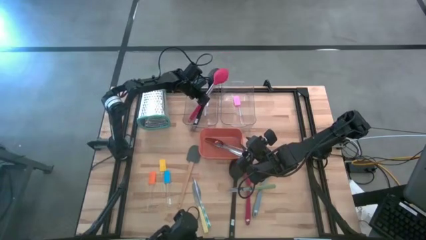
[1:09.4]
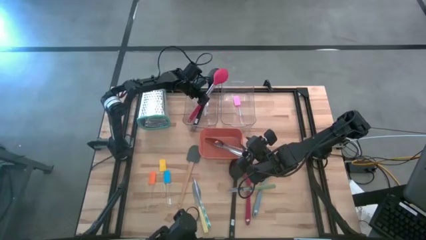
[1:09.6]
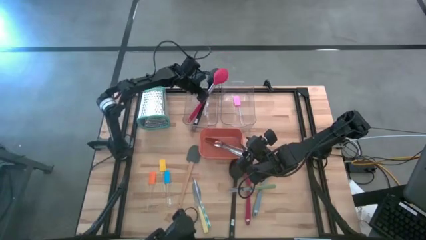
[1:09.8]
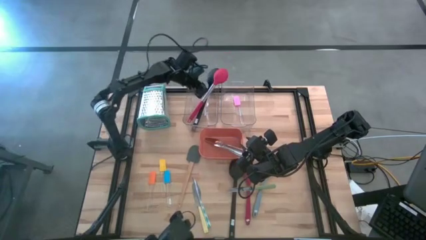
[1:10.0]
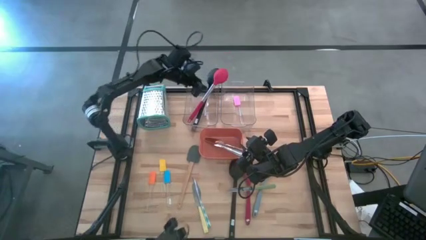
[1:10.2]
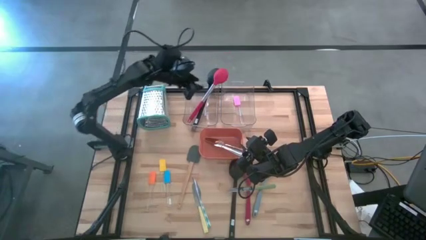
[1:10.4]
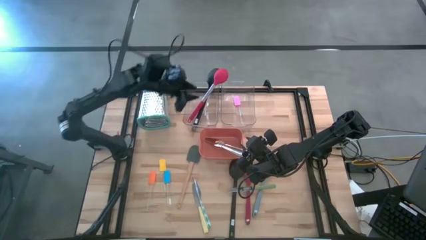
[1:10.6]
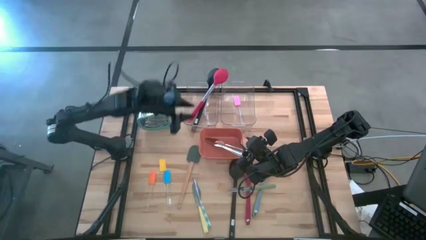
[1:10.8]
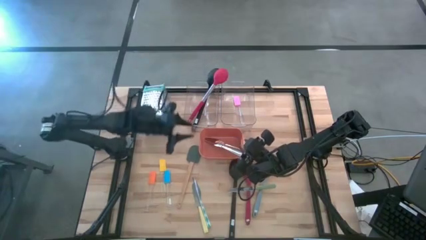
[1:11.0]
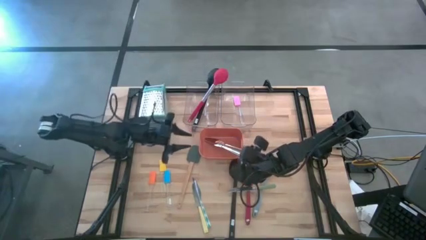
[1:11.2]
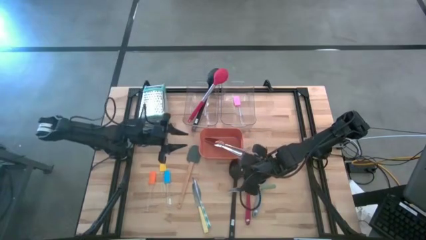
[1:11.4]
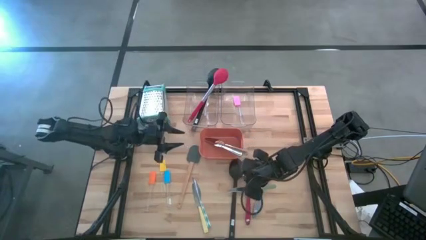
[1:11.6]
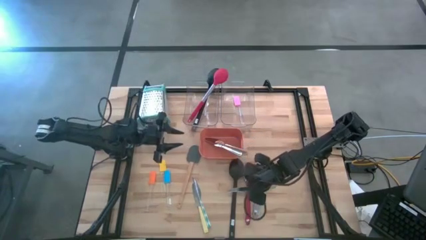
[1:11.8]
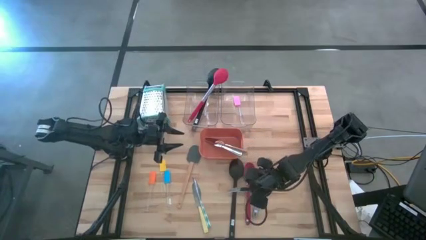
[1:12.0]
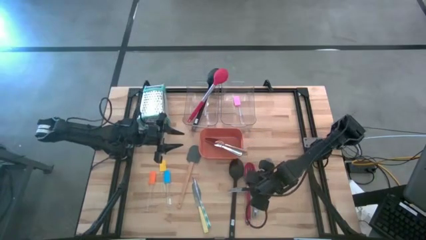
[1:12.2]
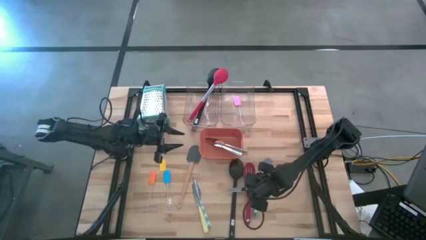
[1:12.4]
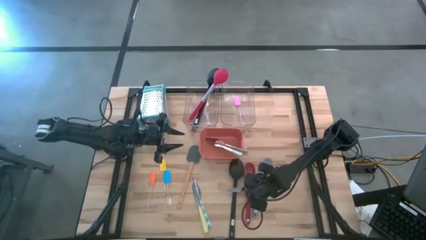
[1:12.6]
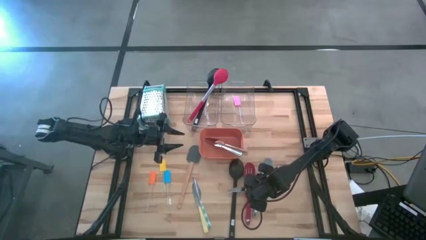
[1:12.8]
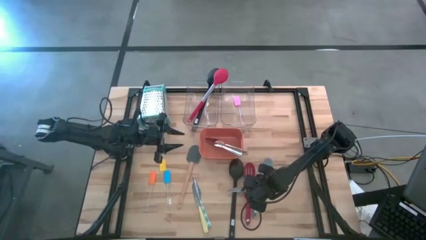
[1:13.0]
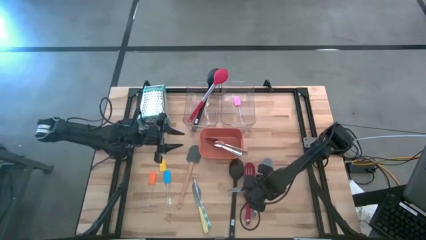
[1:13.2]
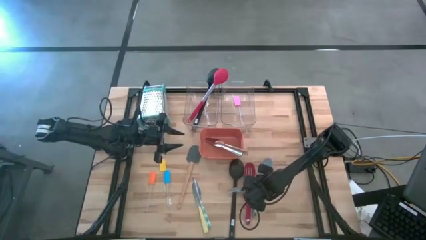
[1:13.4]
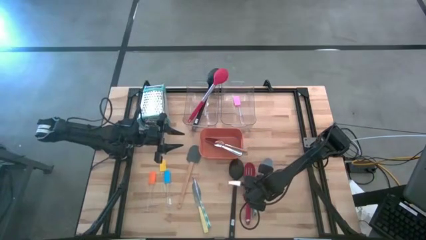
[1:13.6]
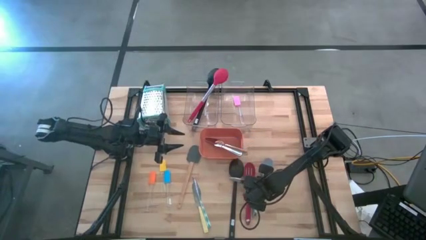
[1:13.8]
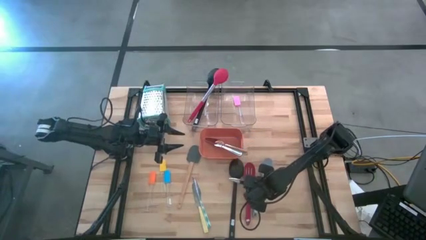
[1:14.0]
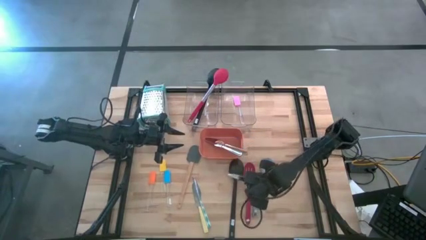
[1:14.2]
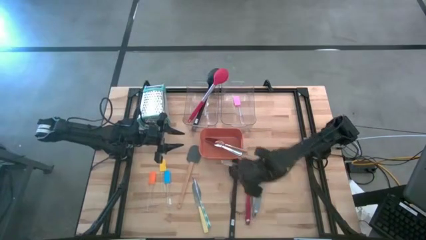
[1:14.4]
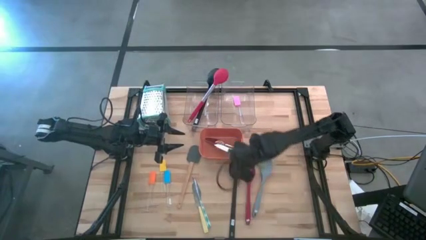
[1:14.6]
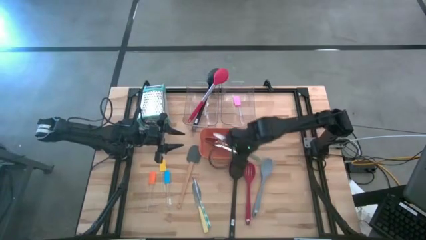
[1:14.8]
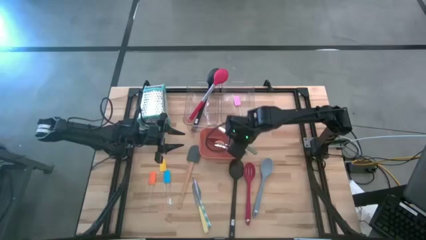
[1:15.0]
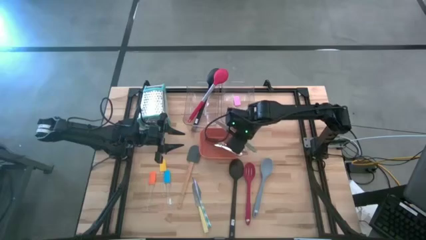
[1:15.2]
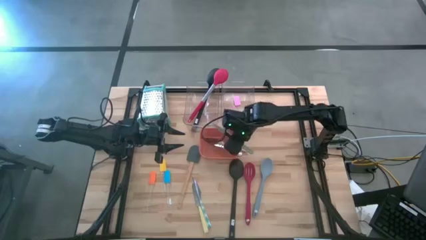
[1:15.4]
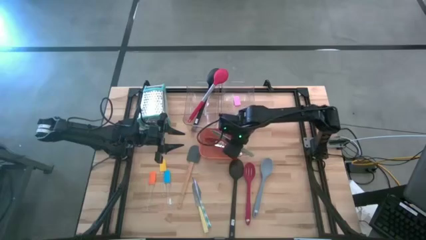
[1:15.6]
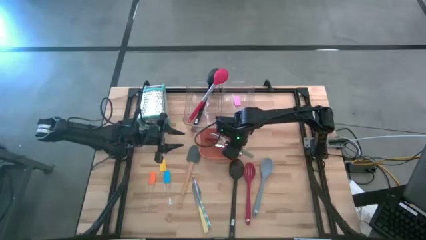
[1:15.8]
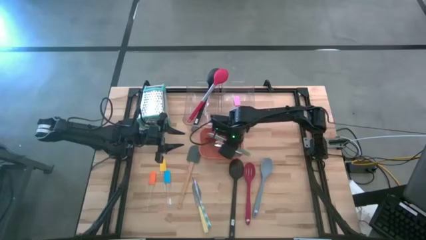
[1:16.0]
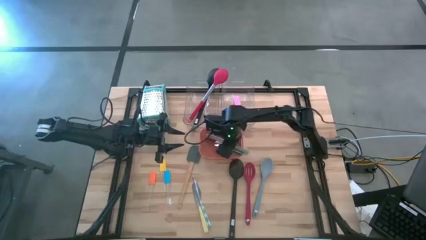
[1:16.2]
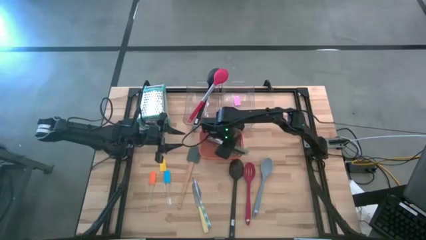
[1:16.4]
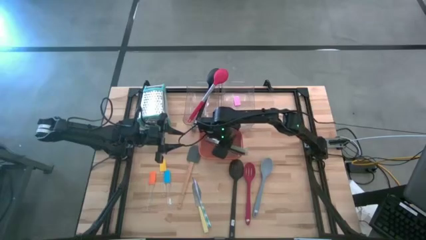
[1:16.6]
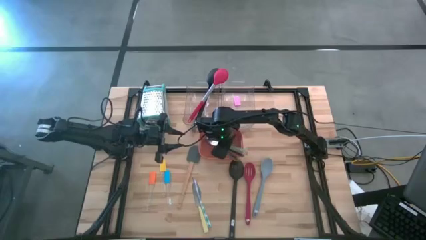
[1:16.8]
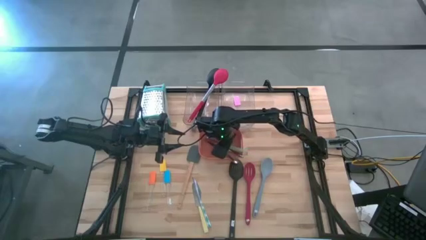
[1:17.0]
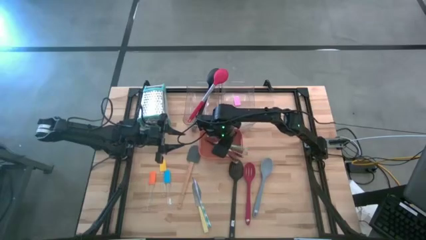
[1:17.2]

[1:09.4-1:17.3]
Task: Pick & Place Kitchen Items
Put the green knife into the orange bin

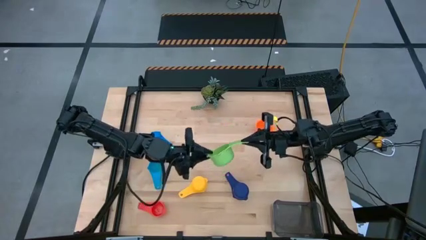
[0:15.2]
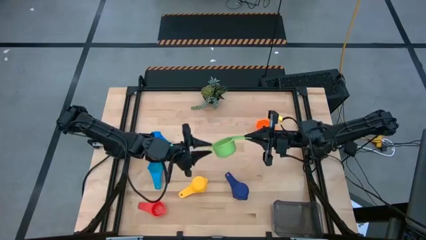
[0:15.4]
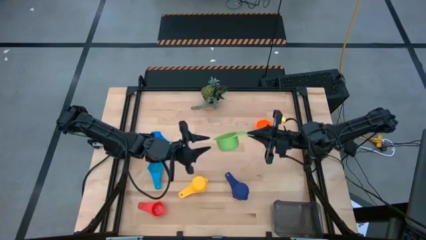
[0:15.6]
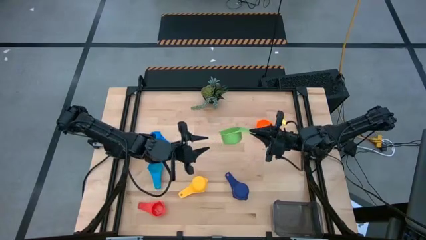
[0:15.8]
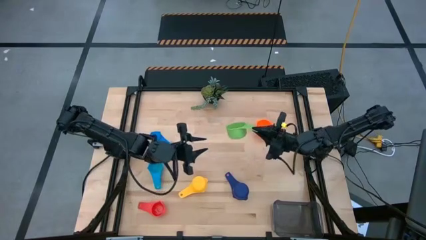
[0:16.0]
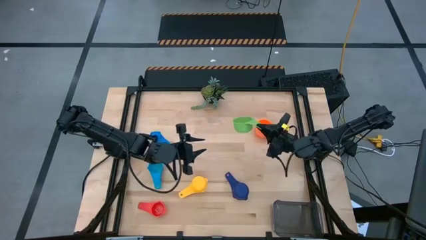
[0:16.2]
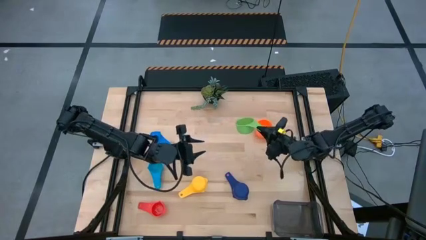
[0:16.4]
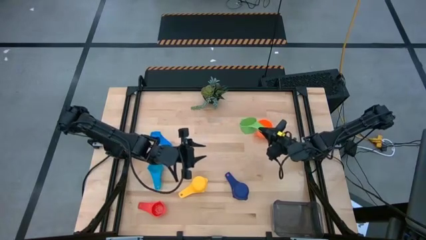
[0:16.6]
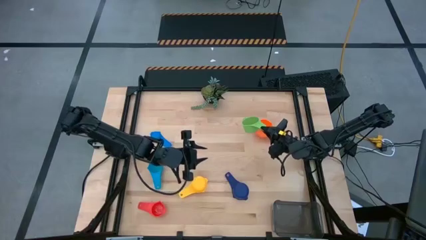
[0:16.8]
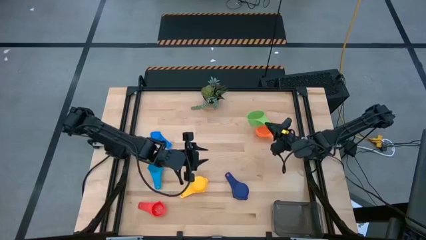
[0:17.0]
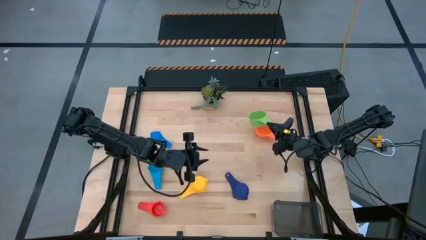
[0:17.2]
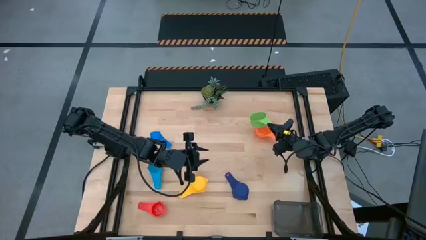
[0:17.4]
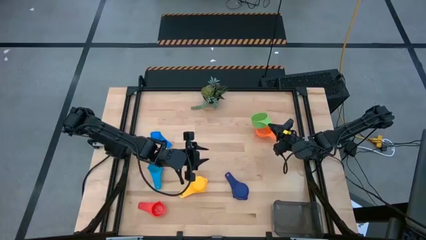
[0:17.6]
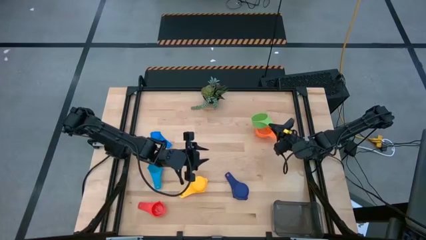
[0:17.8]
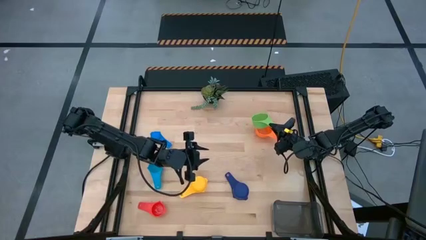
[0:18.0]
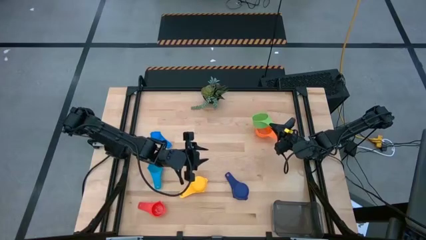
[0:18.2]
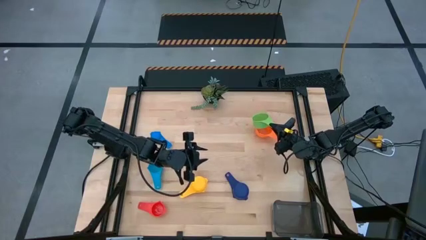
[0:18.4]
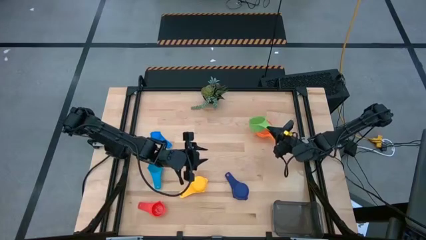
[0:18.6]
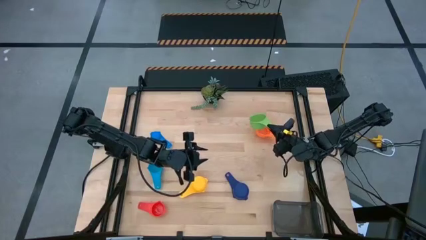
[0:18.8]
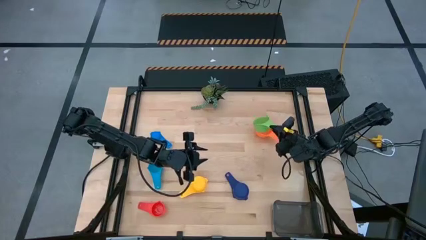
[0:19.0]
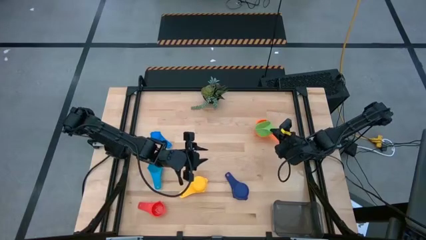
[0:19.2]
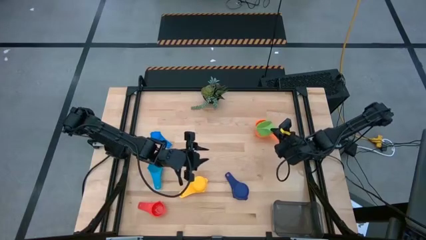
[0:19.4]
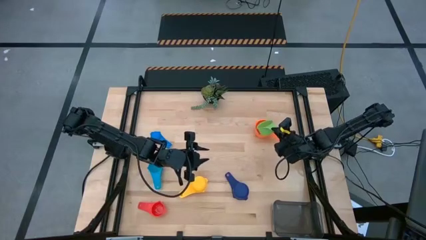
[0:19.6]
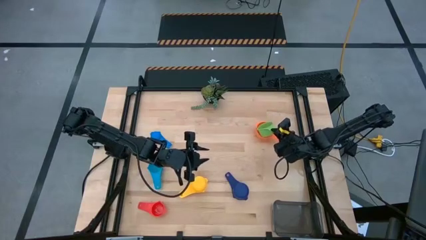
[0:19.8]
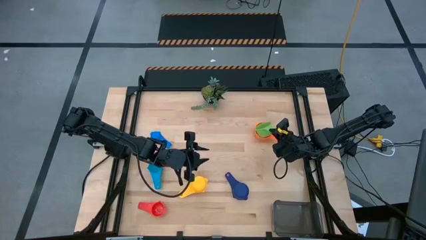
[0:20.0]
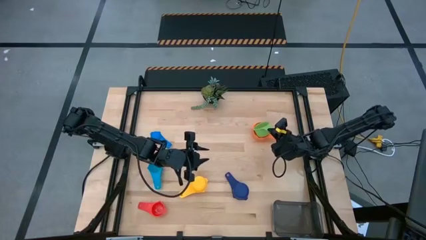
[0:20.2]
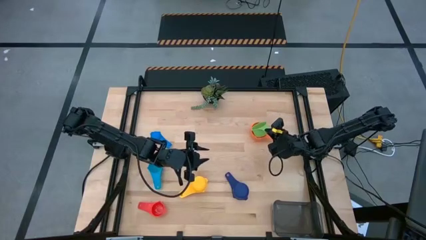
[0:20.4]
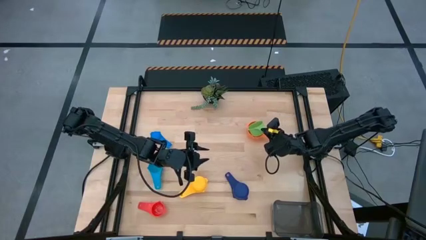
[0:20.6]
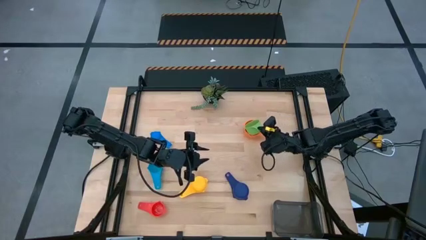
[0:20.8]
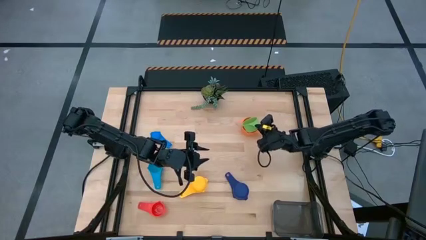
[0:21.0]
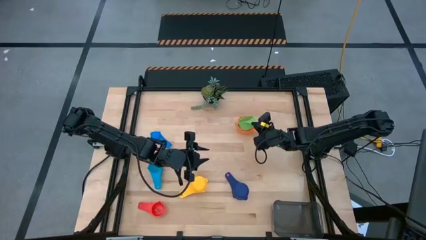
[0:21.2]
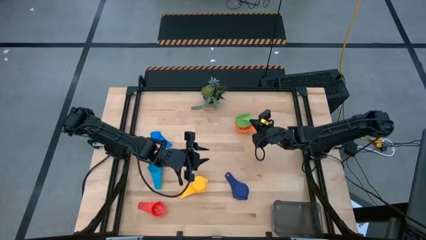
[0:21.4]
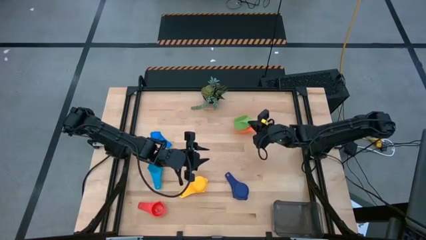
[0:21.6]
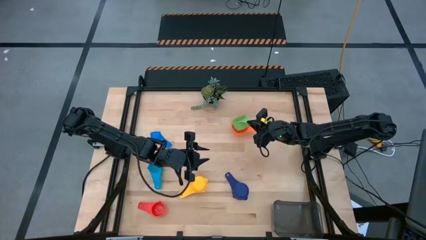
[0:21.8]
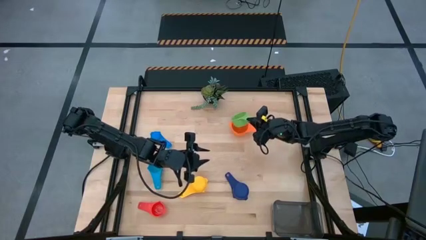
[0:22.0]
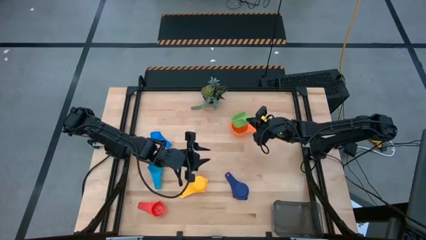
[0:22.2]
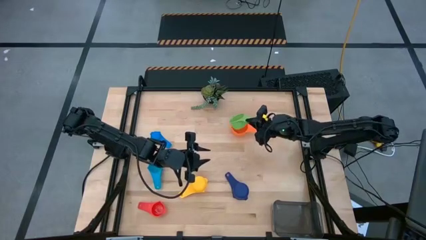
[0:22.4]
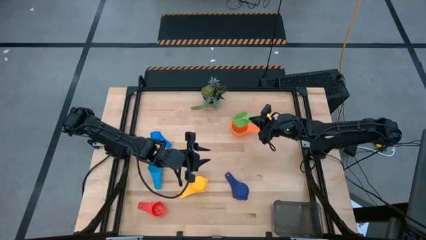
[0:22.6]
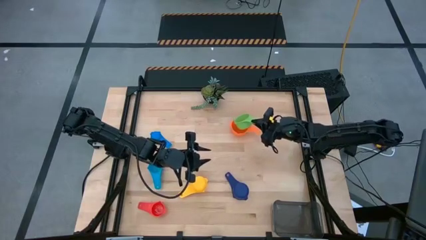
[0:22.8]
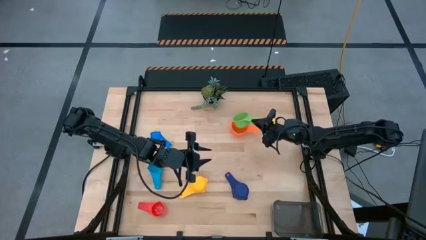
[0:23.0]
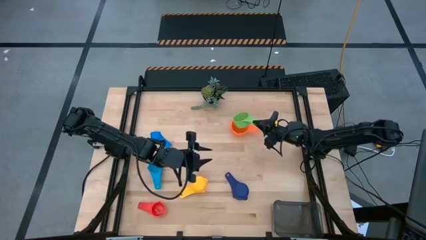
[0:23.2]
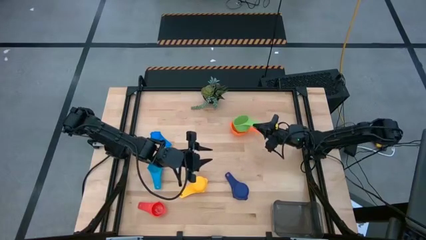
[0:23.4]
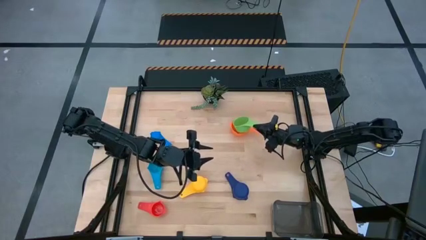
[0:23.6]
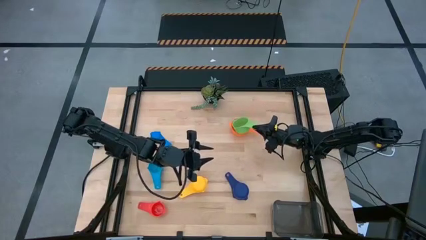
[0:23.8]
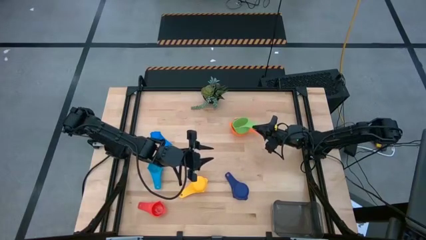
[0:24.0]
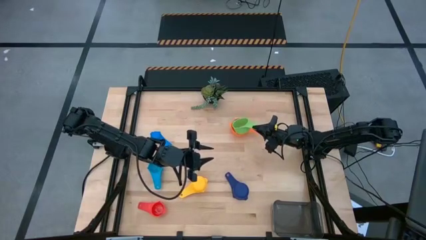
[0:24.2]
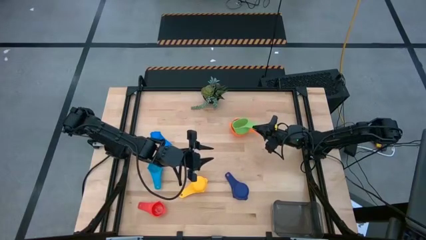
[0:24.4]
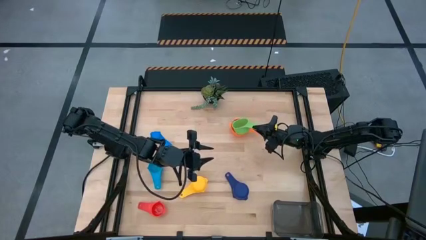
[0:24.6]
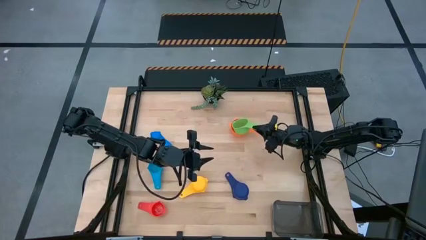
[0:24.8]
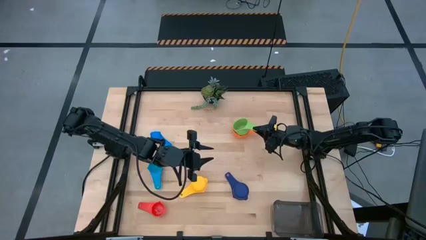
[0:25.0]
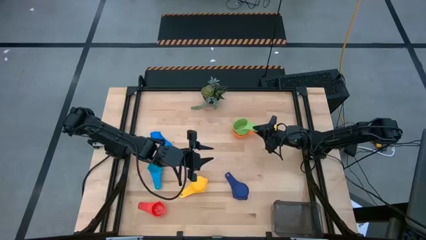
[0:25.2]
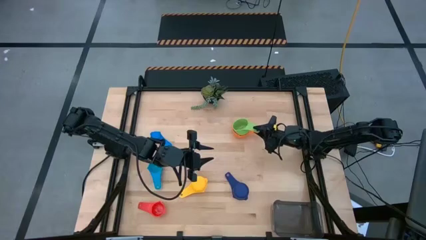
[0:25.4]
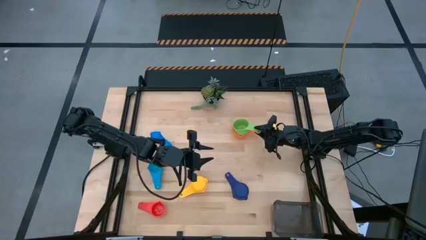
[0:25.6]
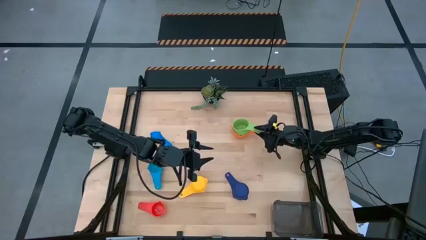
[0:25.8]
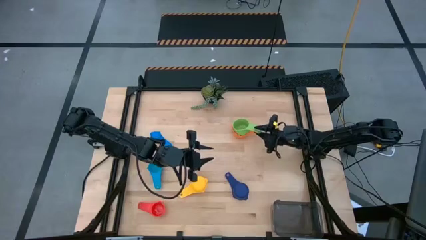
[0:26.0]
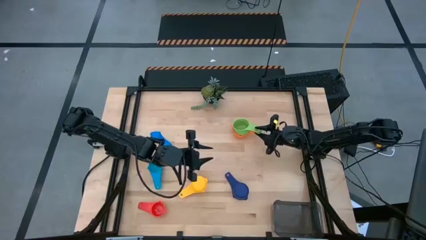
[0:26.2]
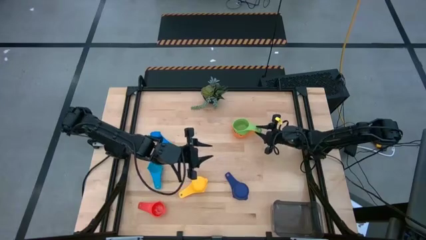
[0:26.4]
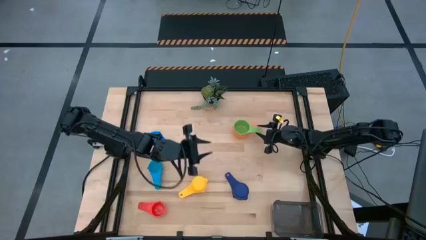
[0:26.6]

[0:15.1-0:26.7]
Task: Nest measuring cups in basket
Stack the green measuring cup on top of the orange measuring cup
